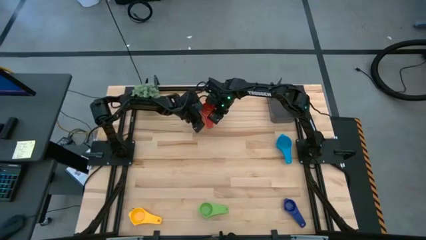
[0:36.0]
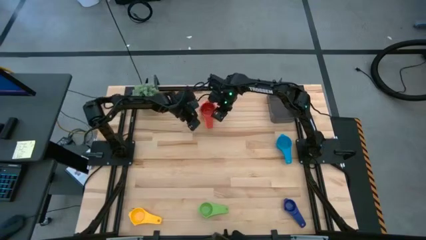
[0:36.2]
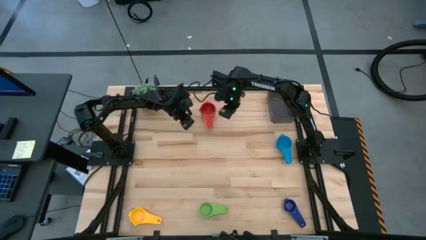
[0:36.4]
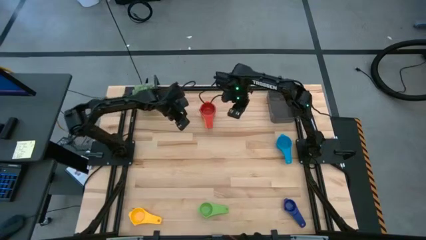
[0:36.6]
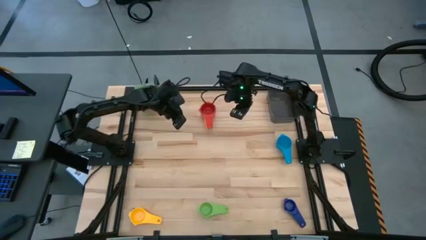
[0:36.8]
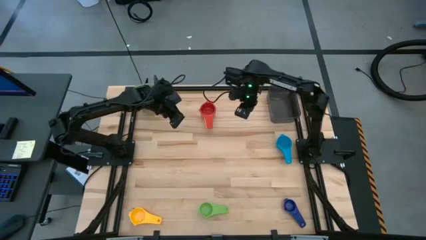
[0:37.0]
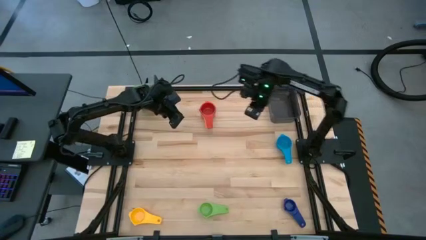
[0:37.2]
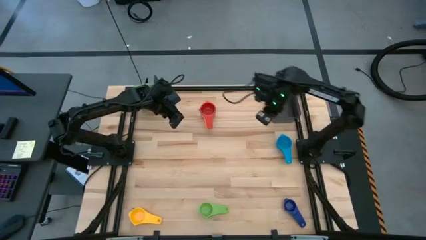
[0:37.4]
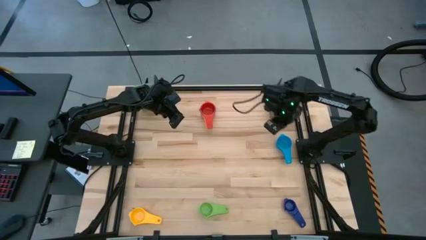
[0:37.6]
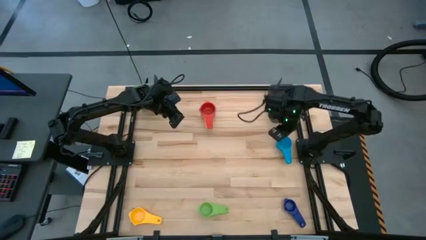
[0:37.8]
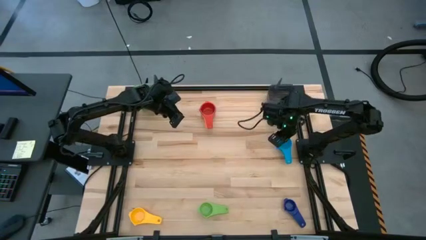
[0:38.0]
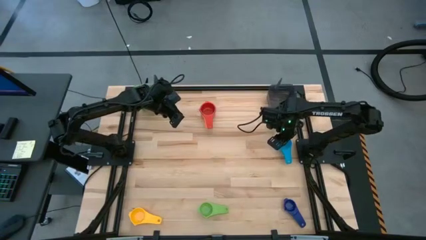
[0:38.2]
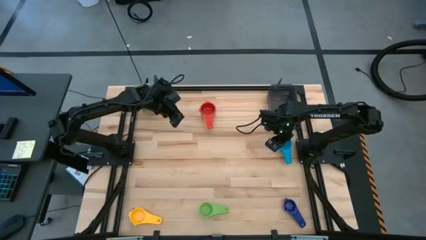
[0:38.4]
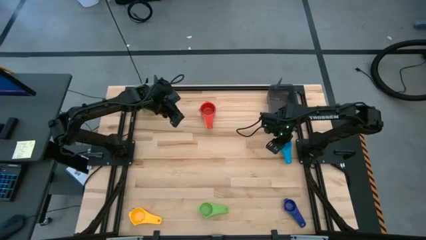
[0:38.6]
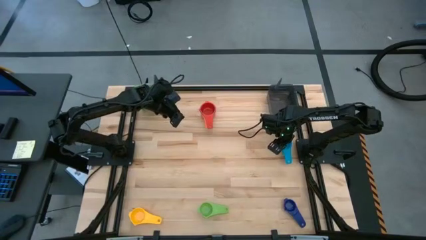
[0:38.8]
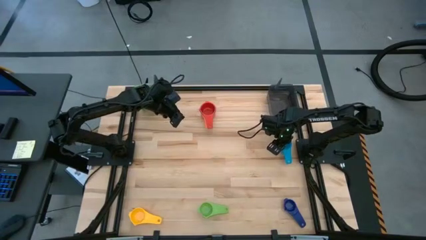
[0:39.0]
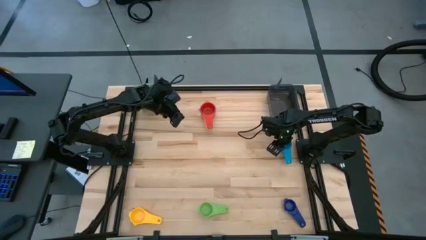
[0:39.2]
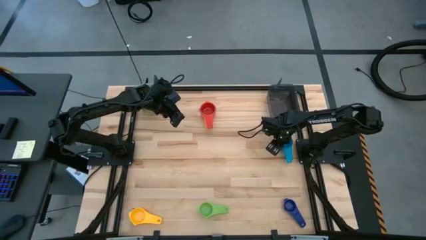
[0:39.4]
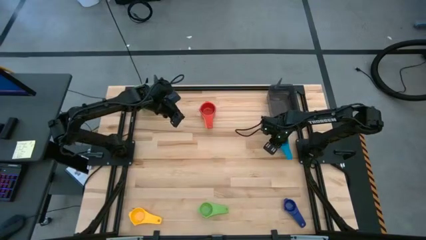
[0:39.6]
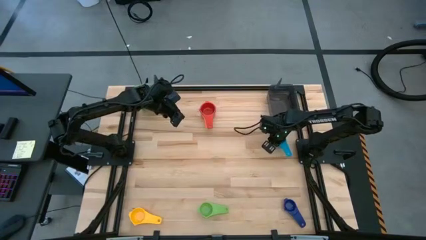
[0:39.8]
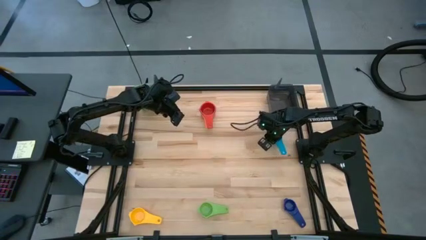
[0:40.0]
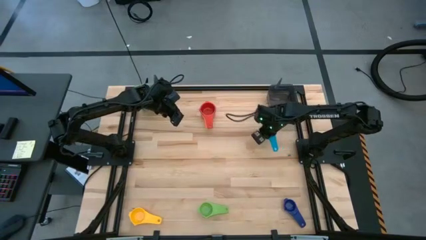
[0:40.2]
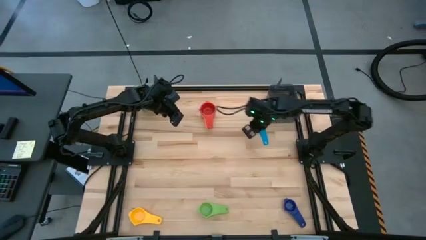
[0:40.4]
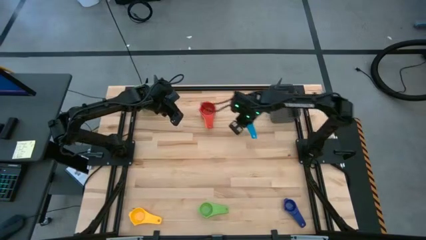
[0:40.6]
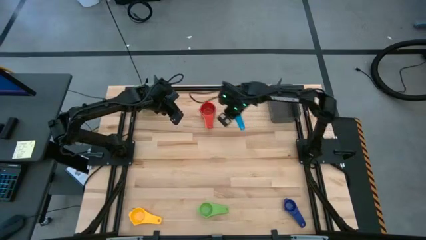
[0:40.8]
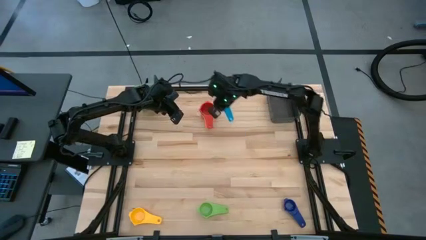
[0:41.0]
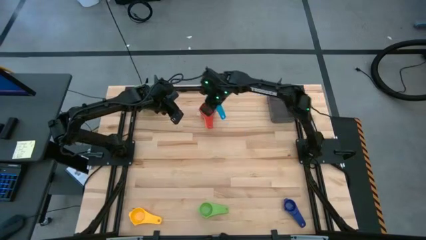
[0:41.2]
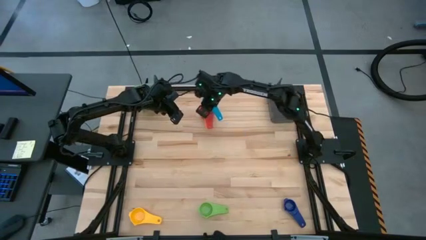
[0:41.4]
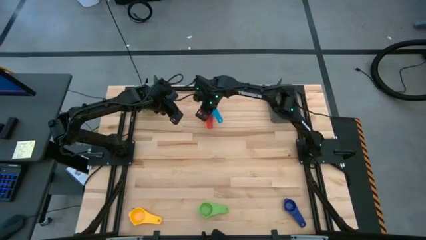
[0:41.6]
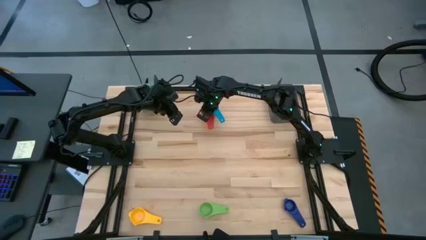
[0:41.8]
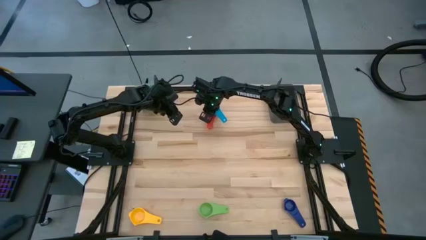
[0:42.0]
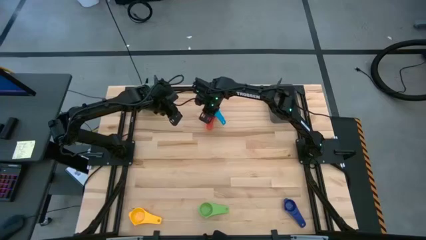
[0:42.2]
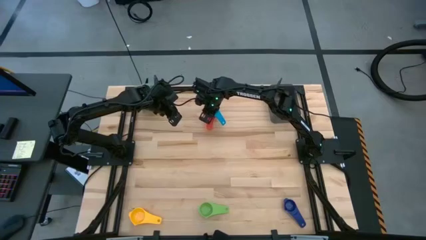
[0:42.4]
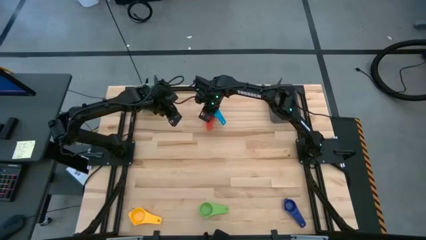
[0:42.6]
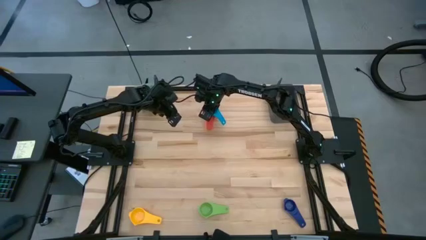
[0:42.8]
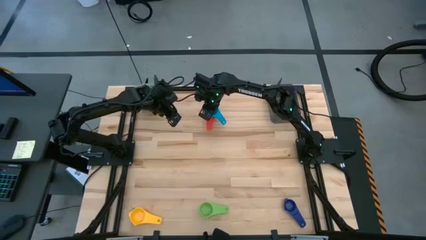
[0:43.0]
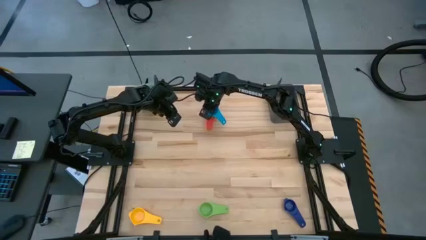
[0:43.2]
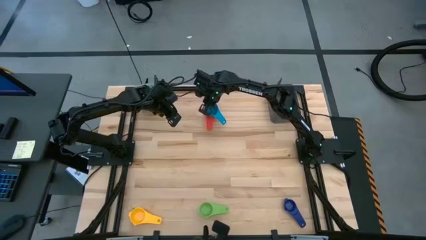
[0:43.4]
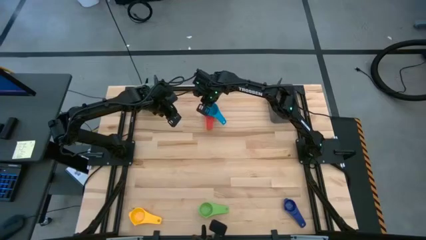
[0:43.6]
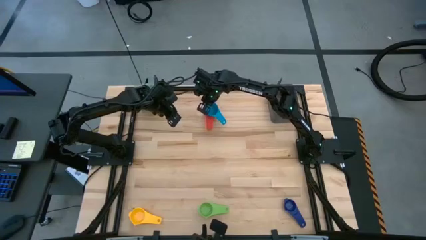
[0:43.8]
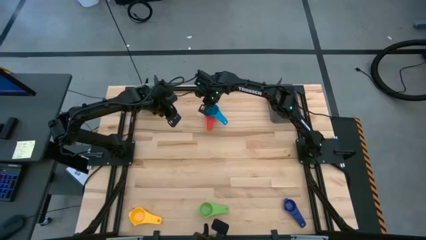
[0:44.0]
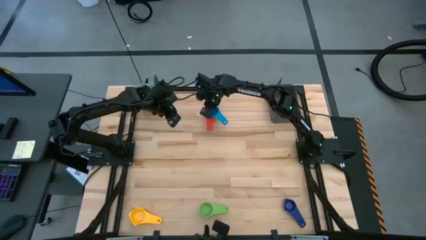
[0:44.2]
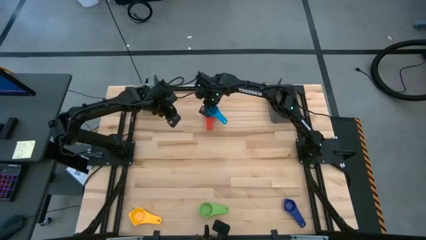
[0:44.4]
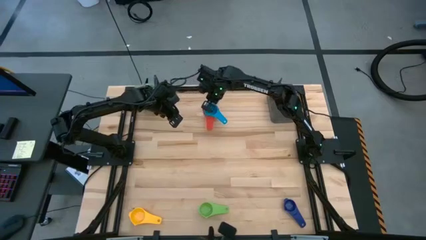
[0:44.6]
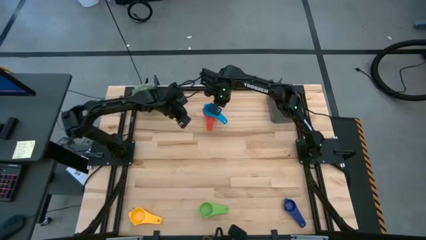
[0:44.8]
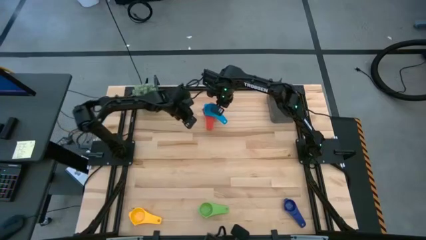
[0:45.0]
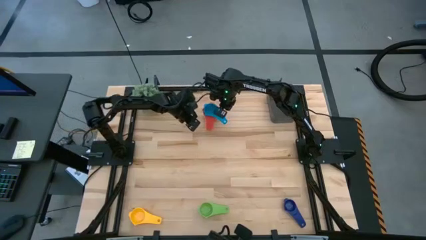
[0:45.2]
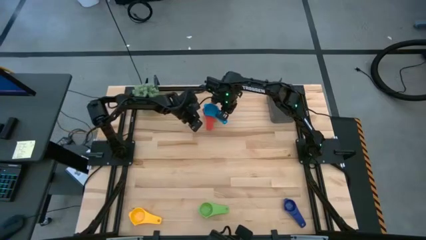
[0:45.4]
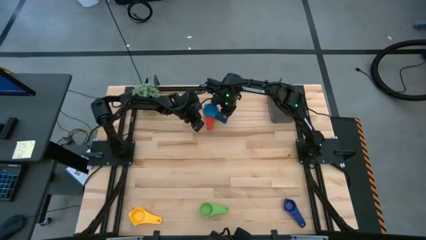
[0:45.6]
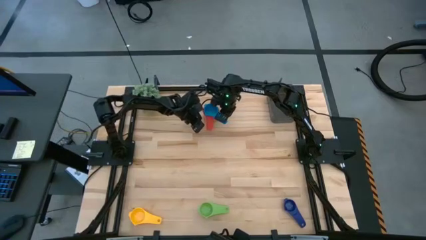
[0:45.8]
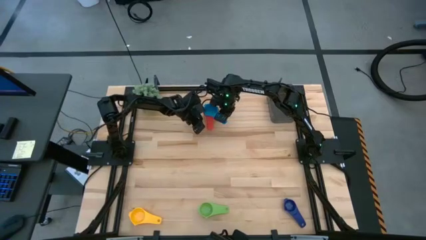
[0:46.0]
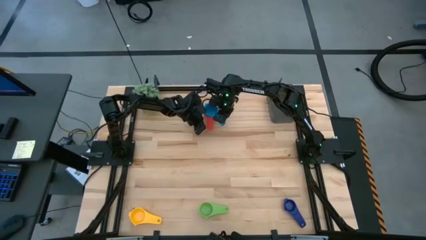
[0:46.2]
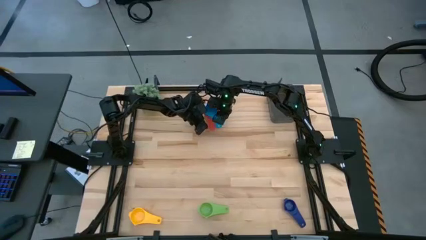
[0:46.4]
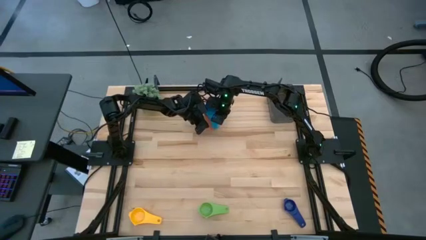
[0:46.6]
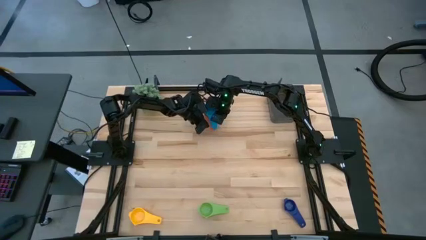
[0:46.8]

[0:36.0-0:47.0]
Task: Nest measuring cups in basket
Stack the light blue measuring cup on top of the red measuring cup

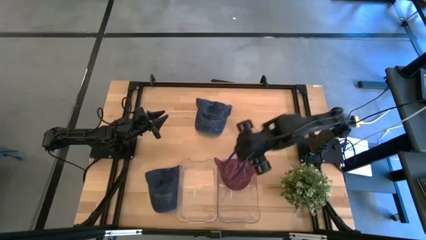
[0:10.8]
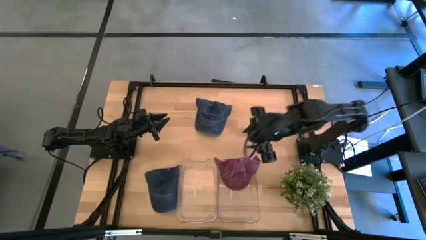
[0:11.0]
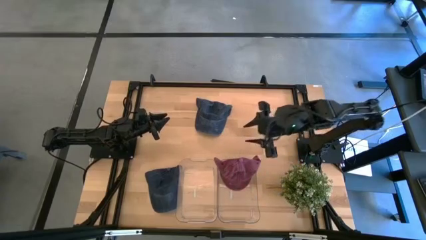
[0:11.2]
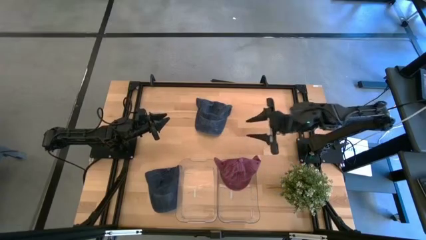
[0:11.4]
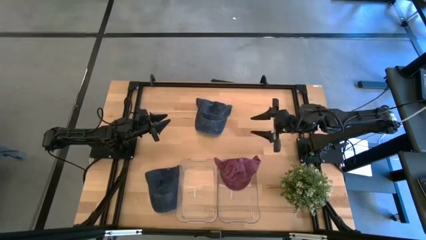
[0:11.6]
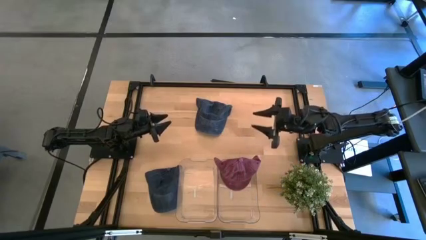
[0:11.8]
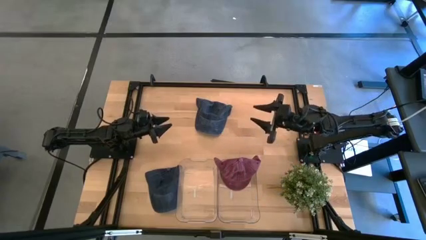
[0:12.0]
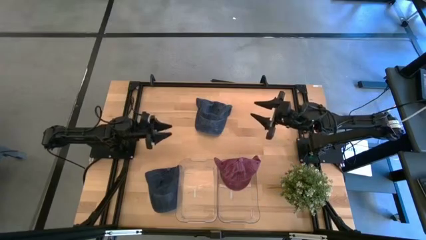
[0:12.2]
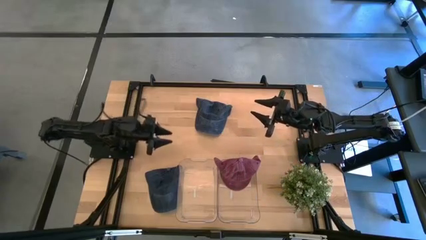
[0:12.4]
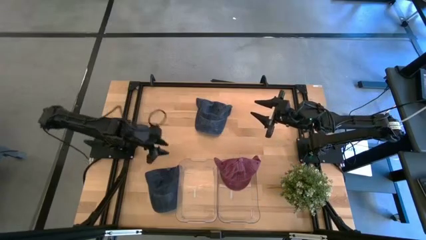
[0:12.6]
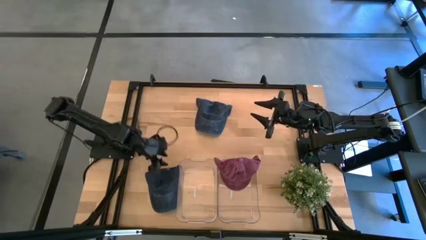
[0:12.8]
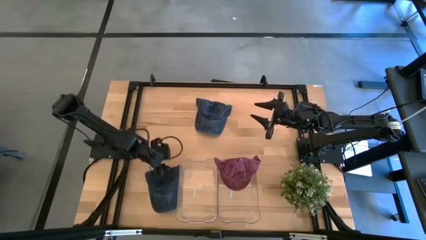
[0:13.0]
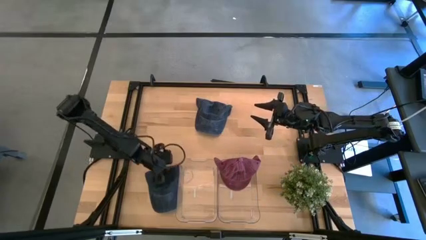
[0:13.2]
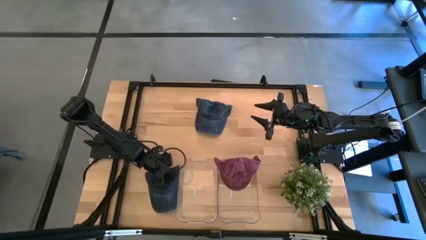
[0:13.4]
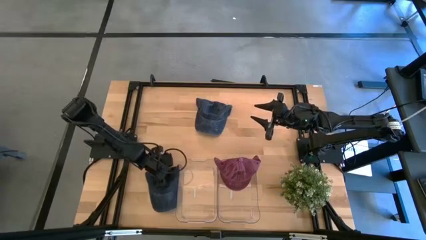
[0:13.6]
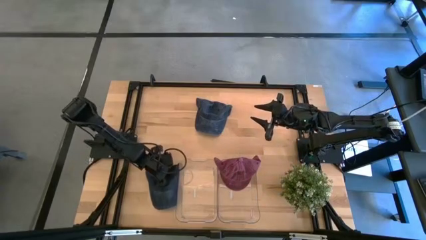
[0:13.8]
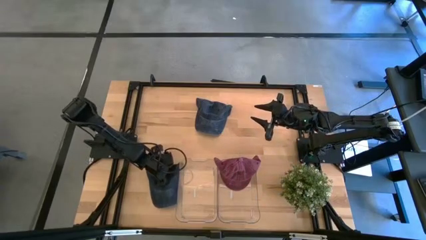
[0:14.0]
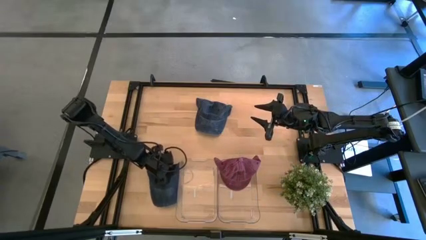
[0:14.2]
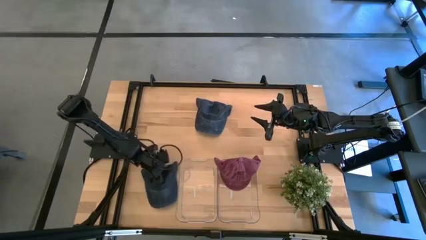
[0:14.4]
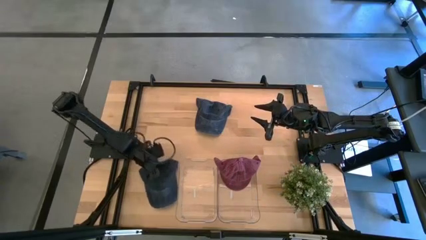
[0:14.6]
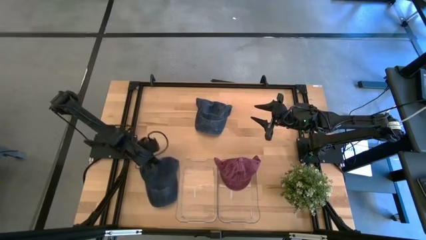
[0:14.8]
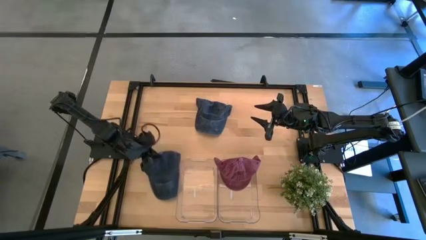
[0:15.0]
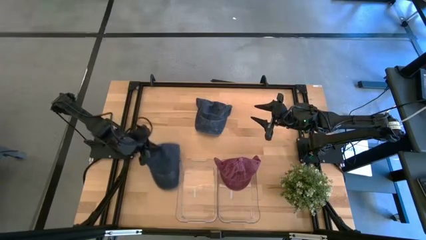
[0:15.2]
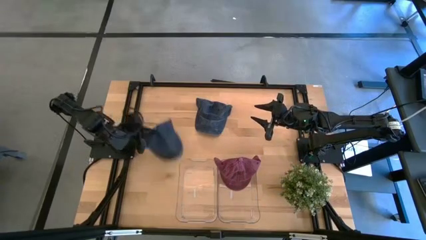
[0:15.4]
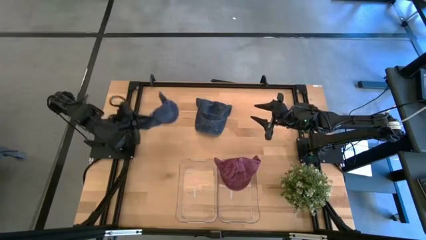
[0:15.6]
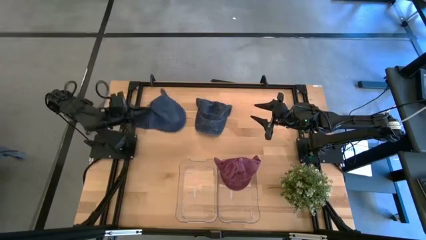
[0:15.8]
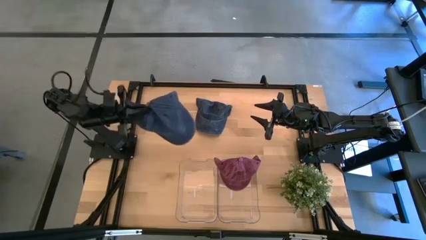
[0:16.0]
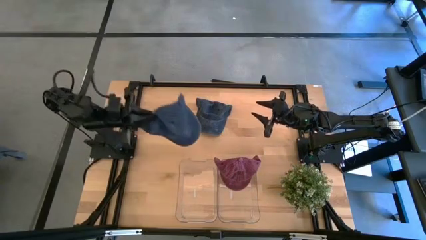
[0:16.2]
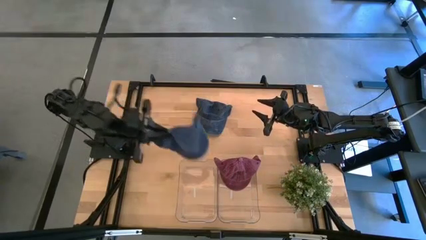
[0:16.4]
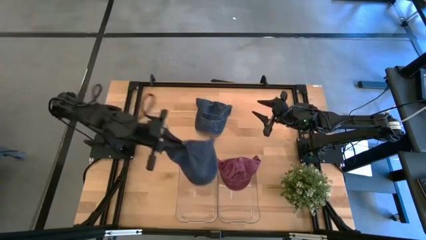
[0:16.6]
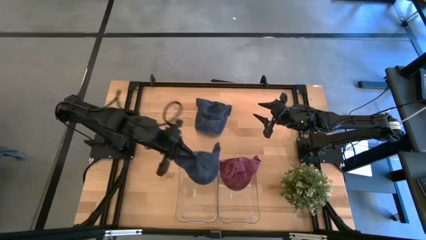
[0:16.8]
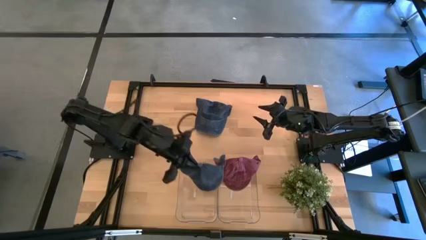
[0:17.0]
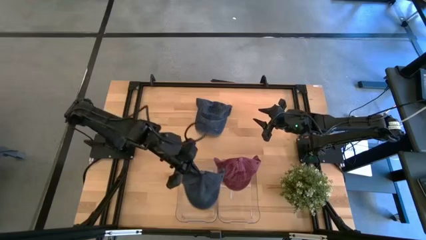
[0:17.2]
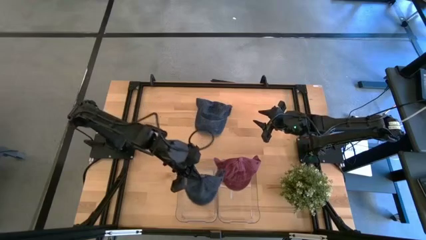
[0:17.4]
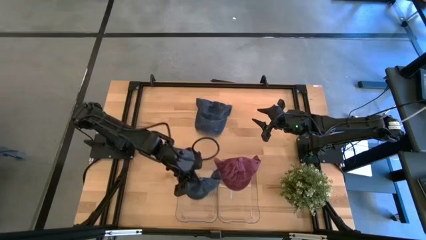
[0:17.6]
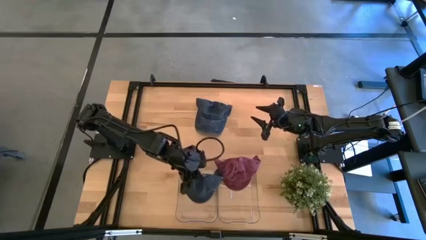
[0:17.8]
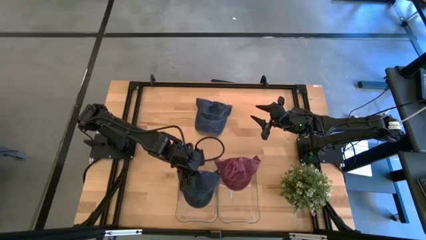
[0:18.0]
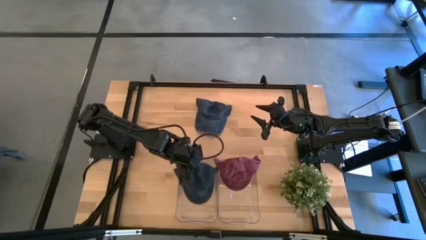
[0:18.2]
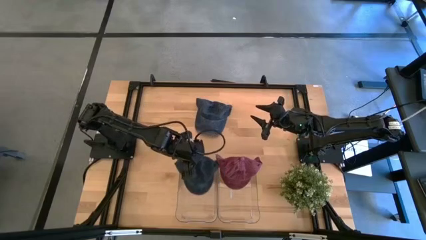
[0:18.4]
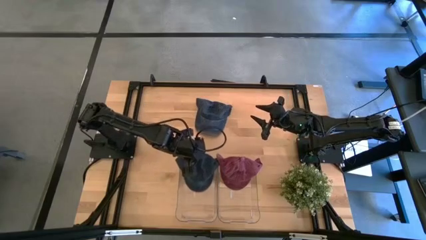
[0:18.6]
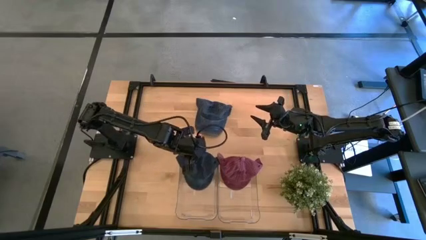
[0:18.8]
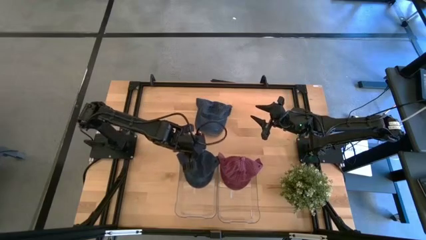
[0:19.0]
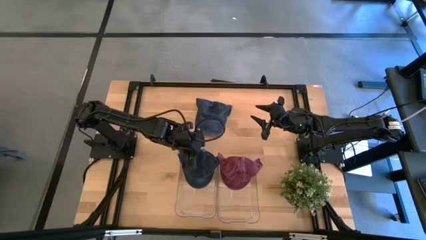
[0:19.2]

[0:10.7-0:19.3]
Task: Pick & Place hat
Put the bottom black cap into the left transparent bin
